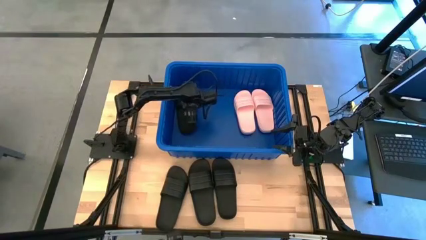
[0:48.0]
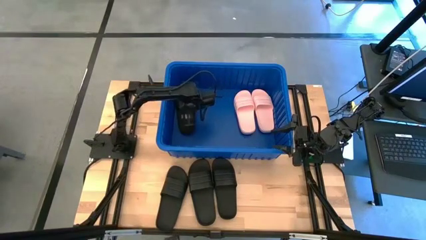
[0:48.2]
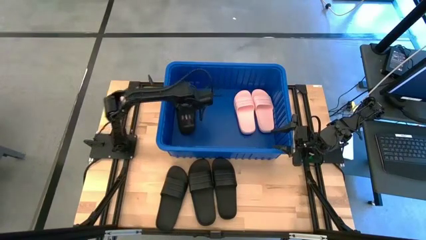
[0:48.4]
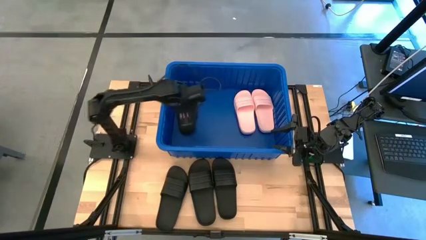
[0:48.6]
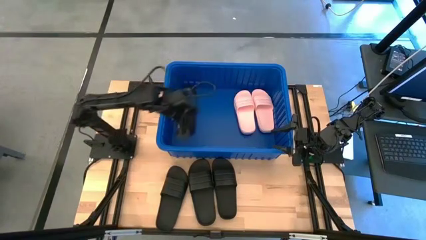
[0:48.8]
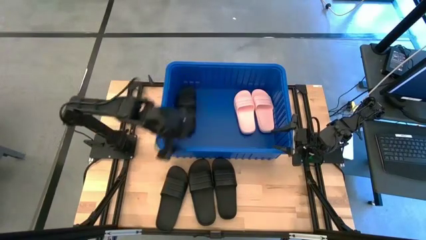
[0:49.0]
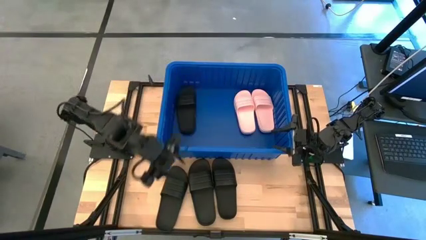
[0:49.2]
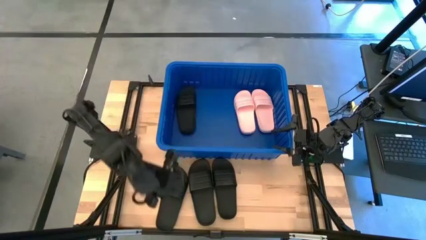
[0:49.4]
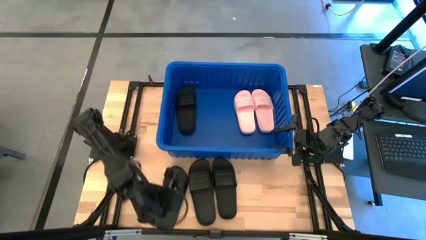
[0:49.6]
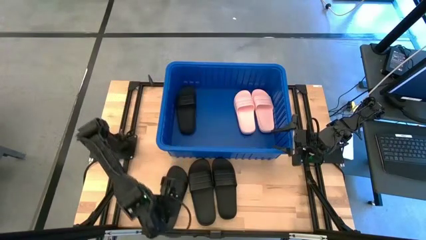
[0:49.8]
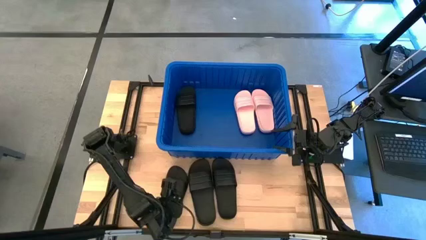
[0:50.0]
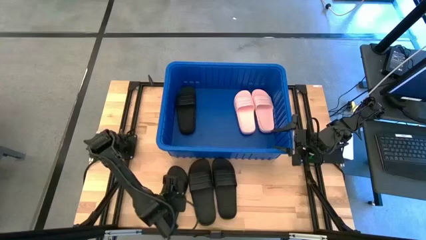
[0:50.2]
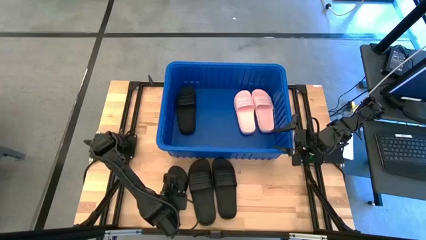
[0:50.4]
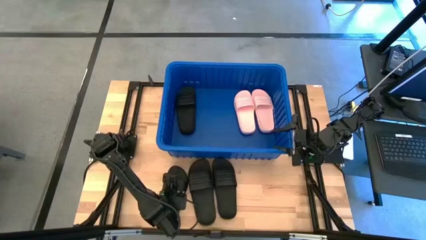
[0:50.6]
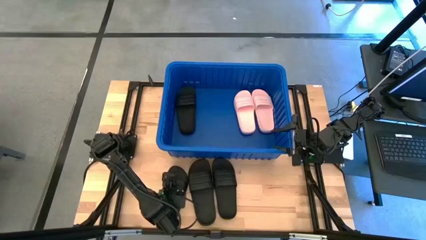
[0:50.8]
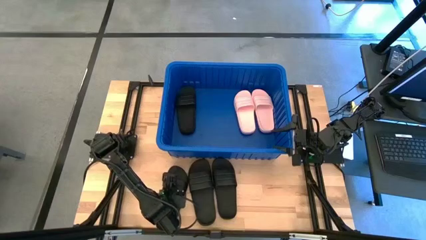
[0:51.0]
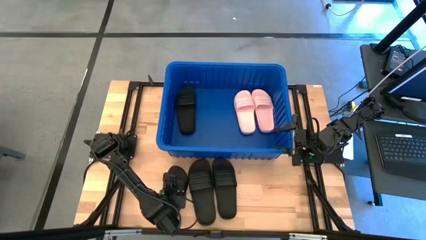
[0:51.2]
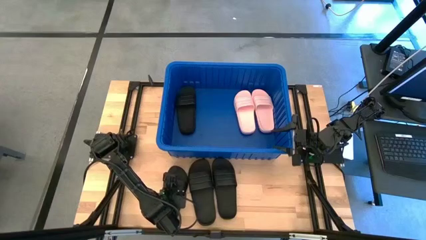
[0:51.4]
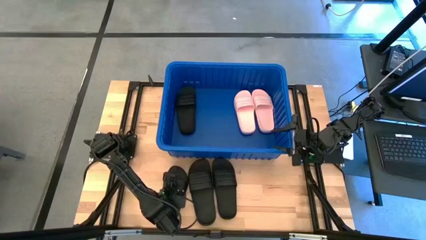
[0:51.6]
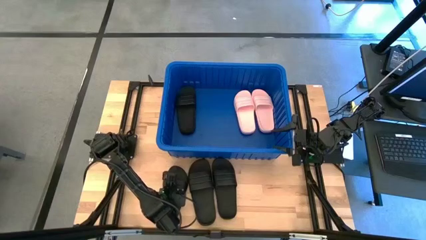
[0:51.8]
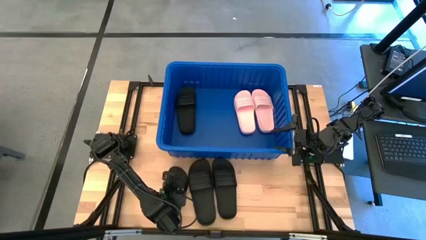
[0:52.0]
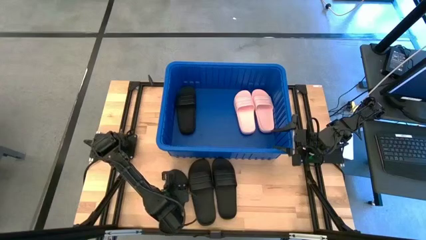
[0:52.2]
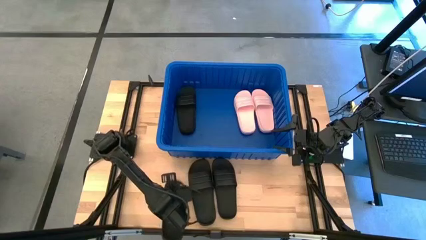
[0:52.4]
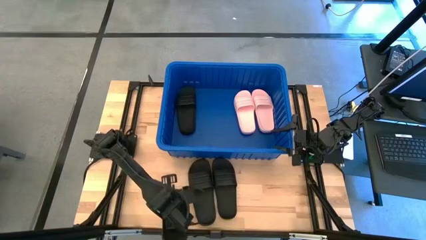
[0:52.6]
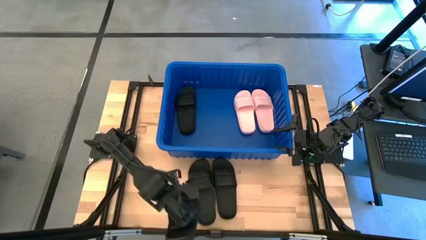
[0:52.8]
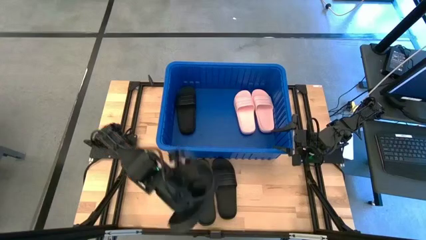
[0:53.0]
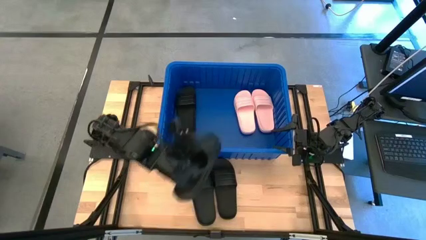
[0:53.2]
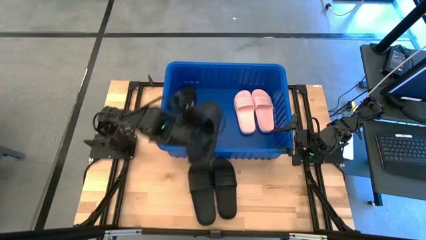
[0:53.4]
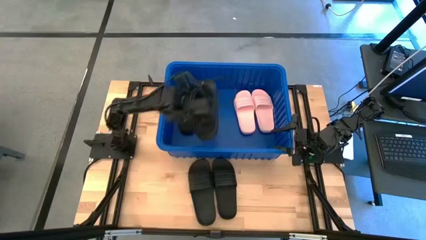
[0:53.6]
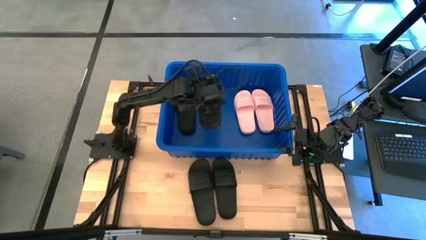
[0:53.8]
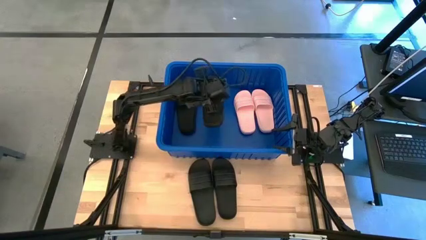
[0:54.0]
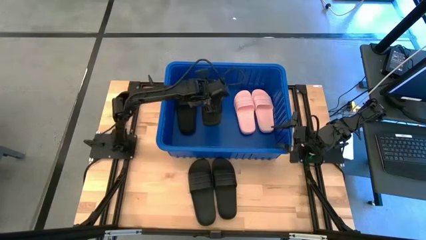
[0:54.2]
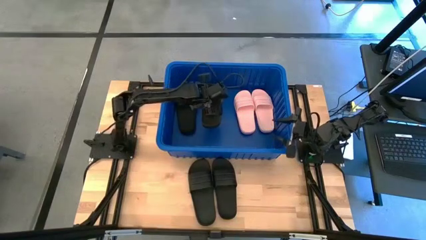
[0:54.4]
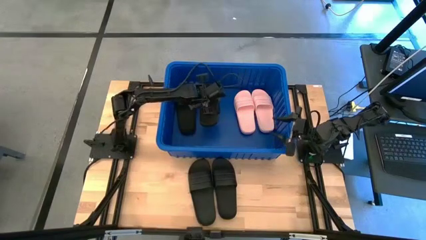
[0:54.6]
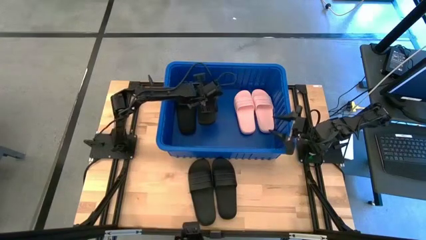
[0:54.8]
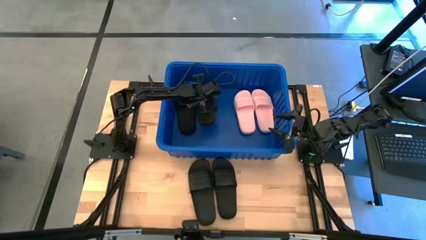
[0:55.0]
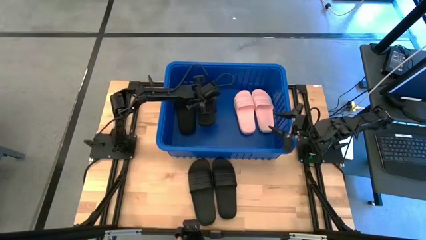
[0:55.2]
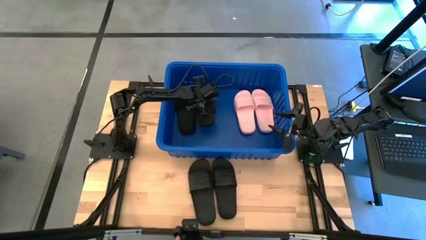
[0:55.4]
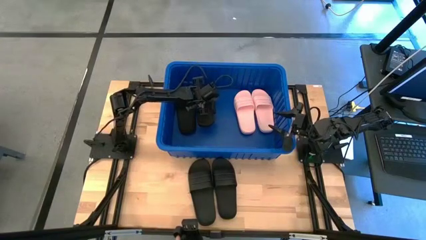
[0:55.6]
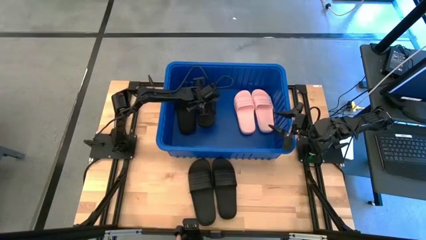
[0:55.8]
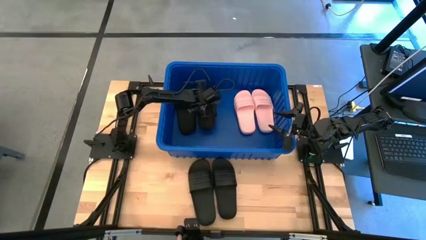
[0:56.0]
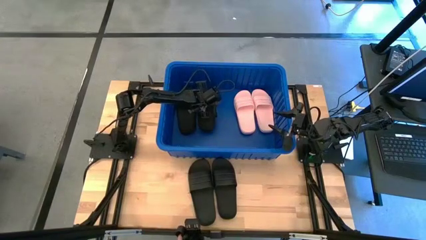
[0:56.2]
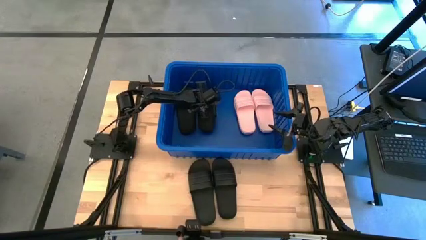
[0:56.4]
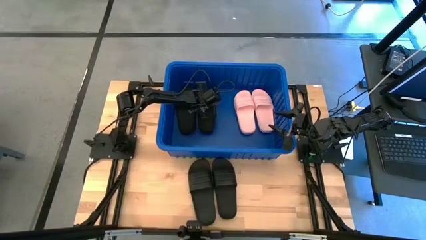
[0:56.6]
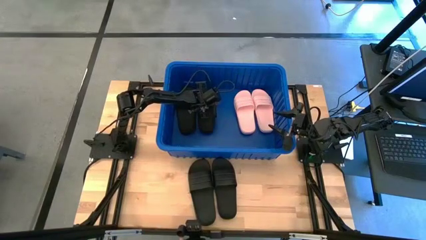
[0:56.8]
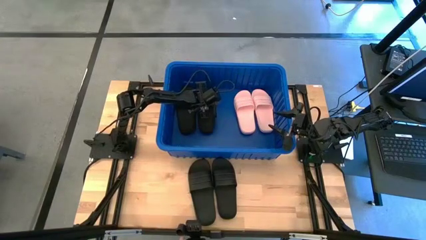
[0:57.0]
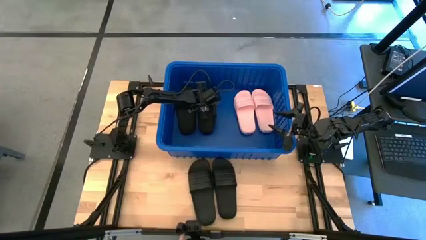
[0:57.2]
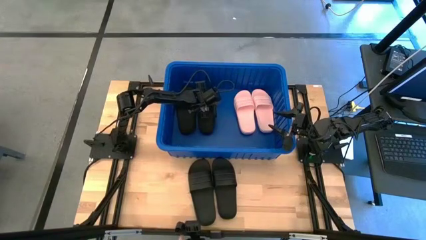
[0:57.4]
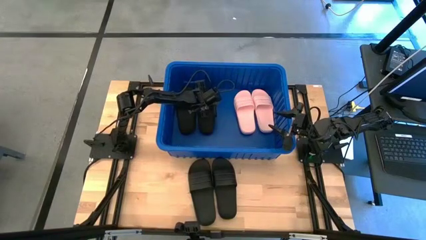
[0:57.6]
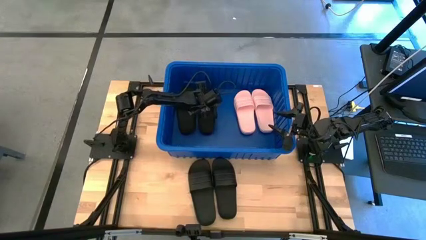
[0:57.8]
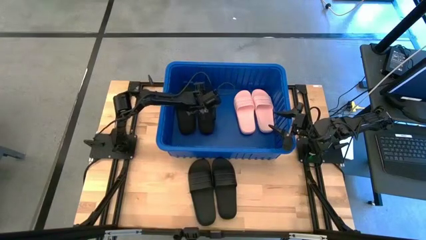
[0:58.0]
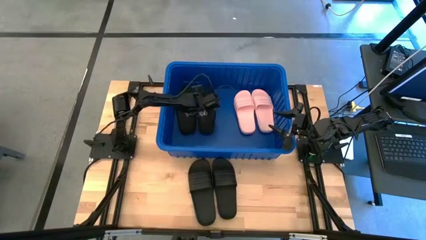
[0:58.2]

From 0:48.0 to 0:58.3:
Task: Pick and place slides into bin
Put the black slipper into the blue bin
